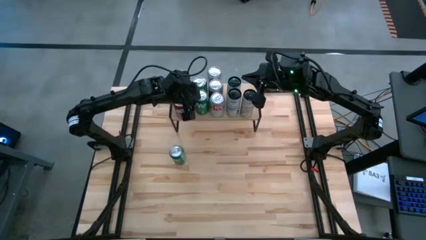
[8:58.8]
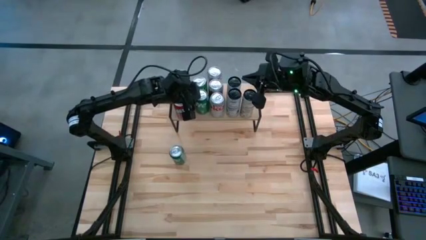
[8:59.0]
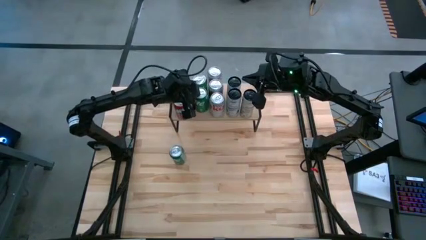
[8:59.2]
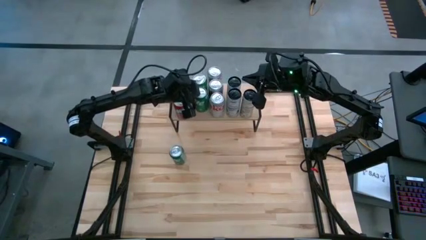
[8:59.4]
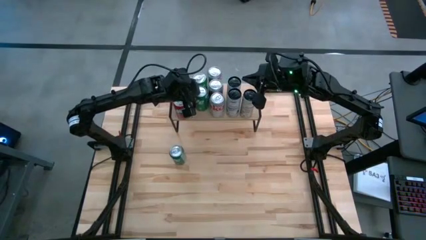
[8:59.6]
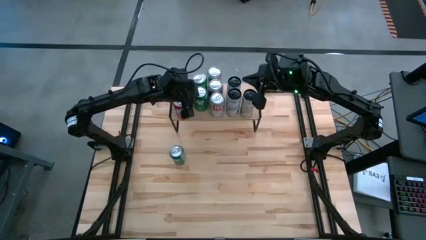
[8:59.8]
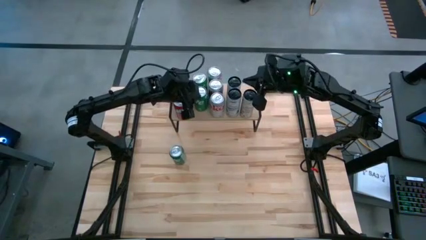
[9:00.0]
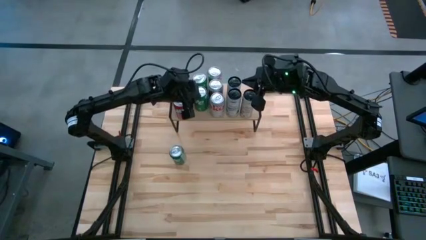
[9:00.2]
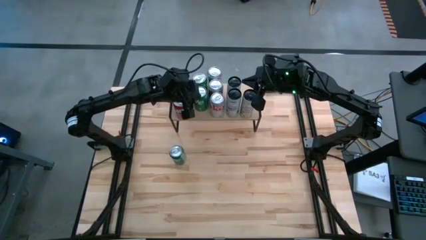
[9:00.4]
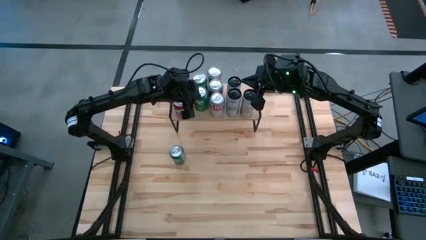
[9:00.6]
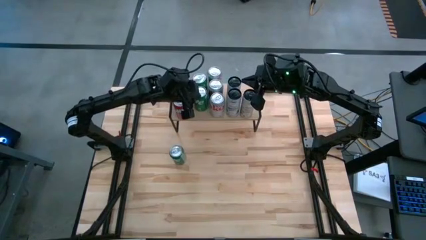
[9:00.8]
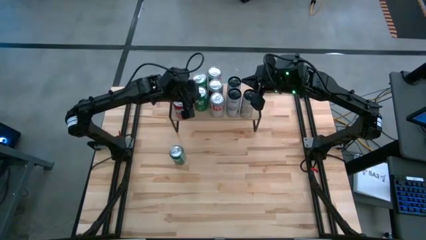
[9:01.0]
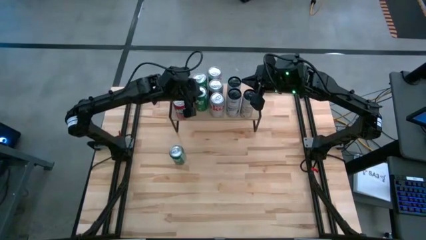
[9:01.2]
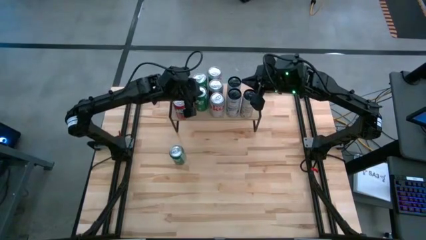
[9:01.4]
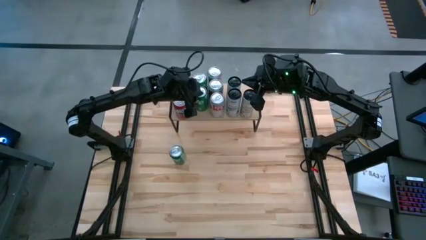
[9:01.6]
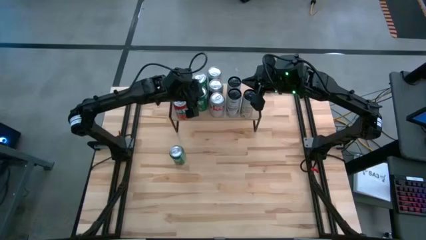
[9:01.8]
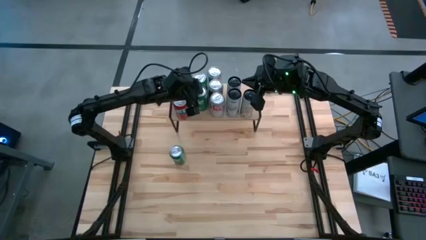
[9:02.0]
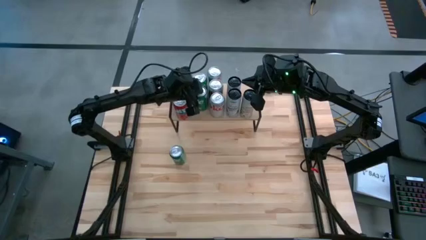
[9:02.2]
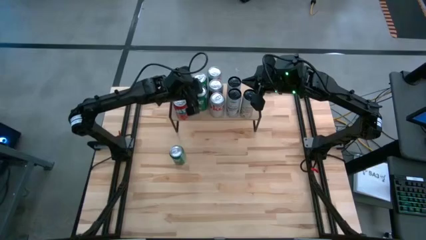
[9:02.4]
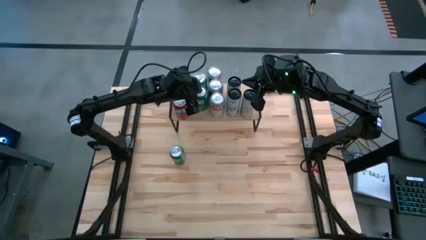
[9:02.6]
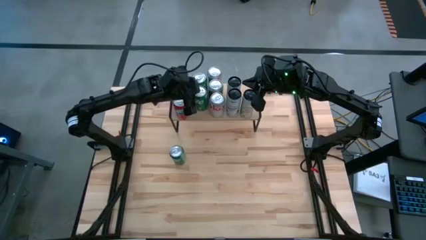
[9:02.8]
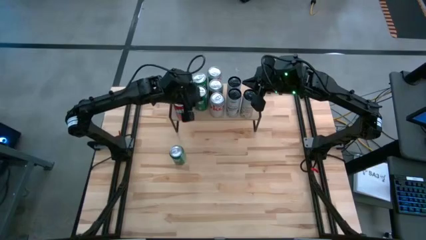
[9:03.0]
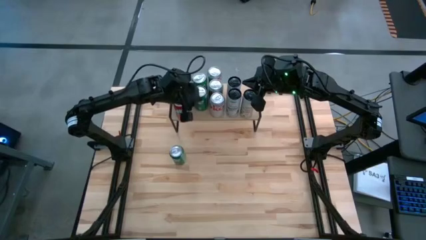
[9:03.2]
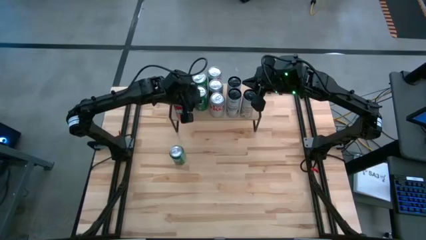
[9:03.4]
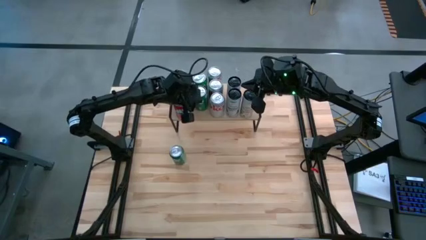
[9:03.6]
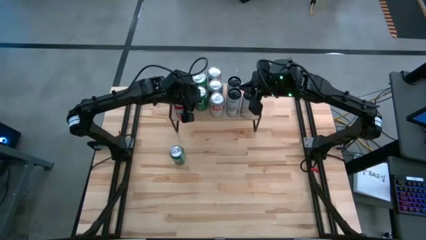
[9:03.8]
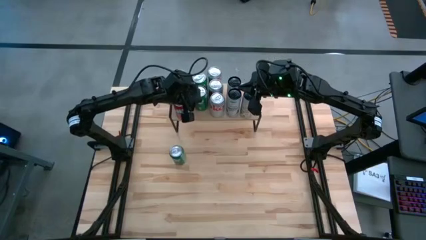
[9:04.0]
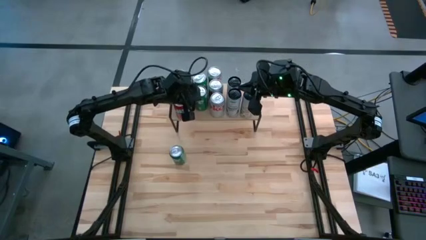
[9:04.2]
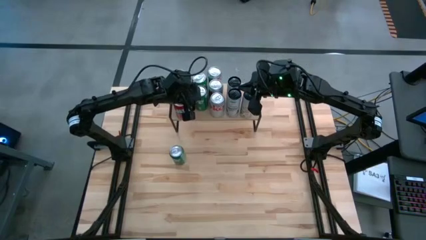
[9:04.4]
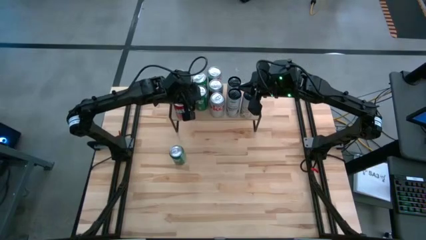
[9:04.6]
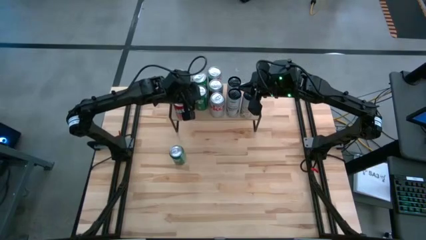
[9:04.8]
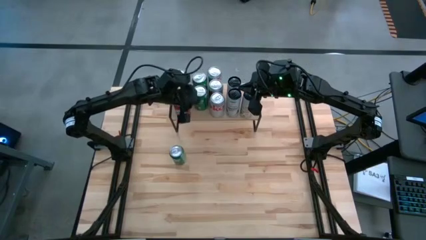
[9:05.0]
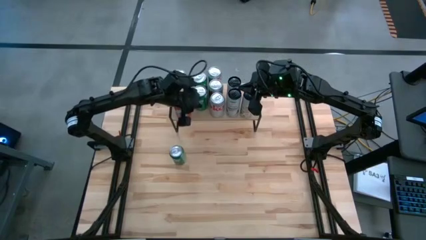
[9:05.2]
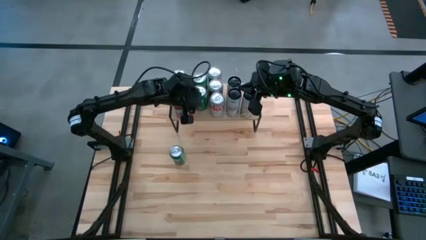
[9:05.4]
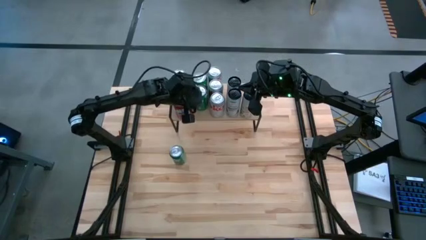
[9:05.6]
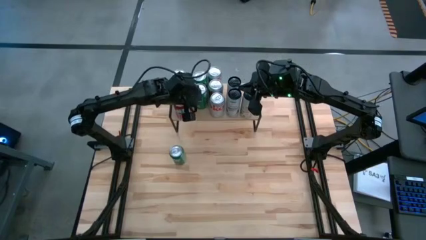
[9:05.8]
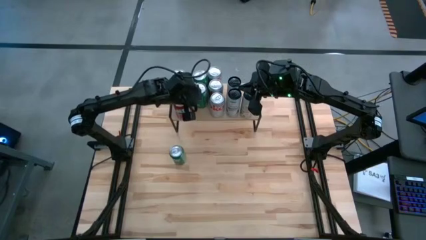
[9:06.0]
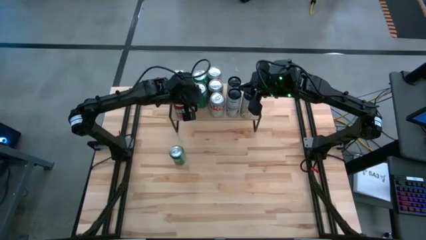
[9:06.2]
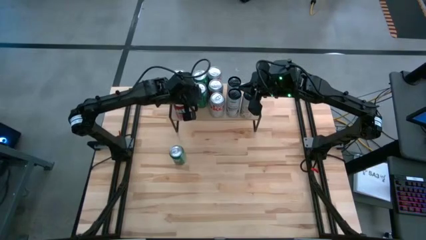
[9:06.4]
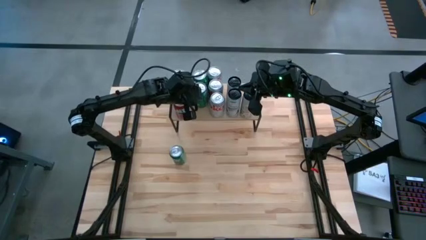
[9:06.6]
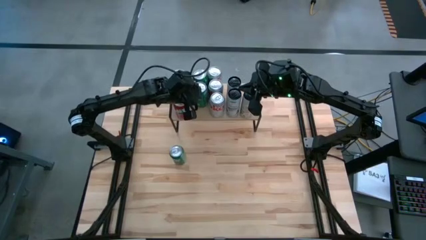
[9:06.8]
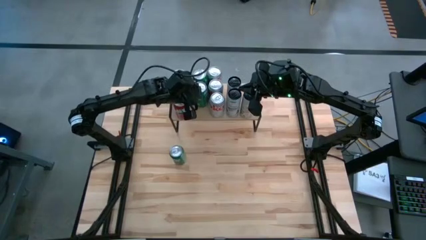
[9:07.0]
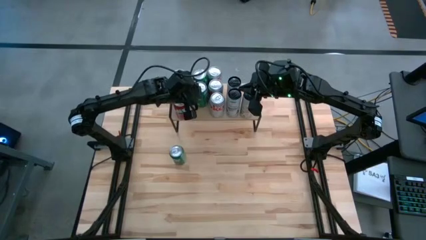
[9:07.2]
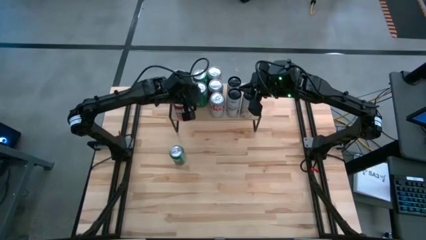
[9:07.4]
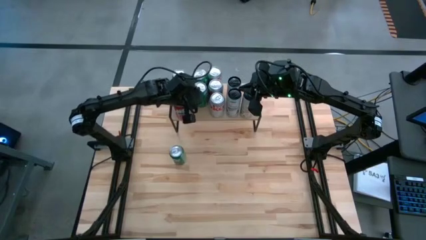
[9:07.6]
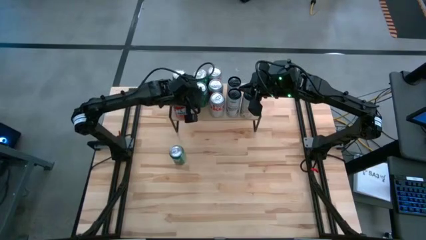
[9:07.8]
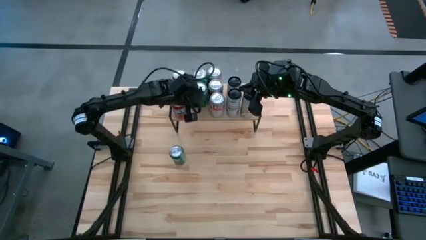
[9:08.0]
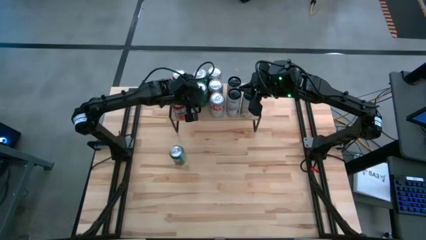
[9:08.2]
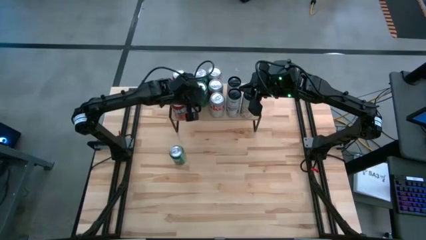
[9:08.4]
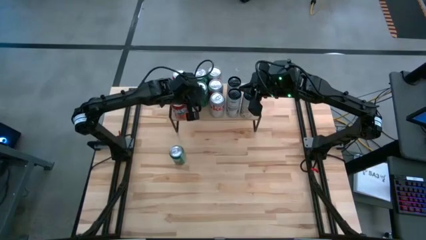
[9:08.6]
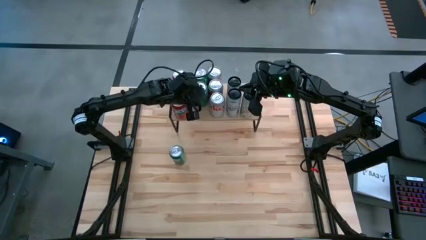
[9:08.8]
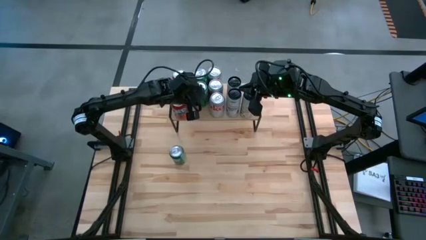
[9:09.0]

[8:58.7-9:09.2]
Task: Place canned beverage on shelf
Adjust the green soda cans on the shelf

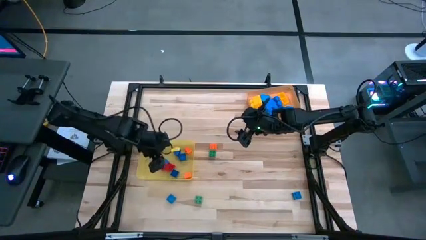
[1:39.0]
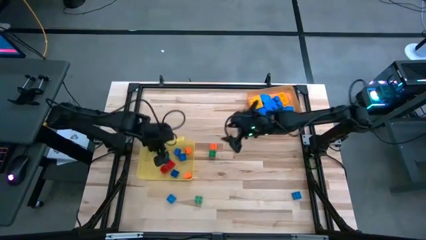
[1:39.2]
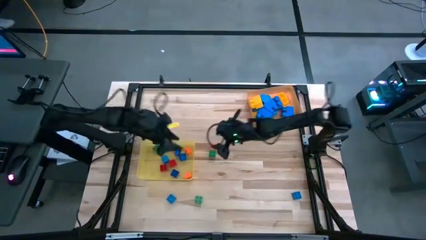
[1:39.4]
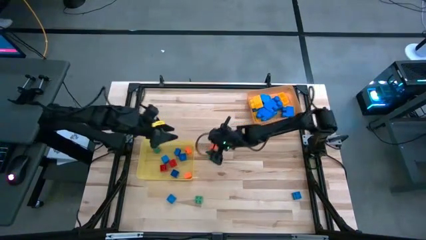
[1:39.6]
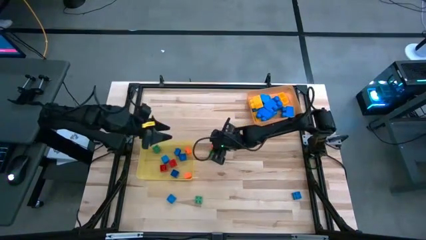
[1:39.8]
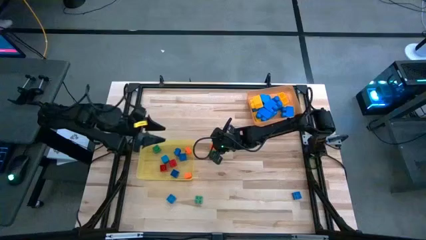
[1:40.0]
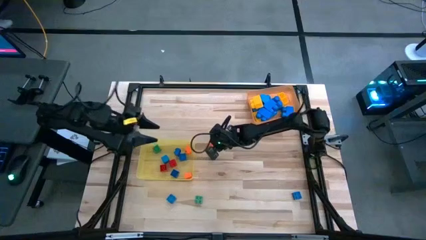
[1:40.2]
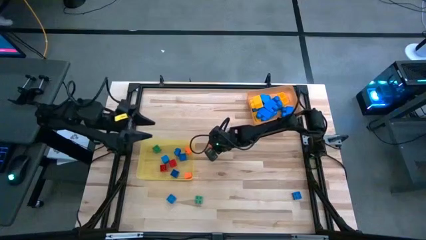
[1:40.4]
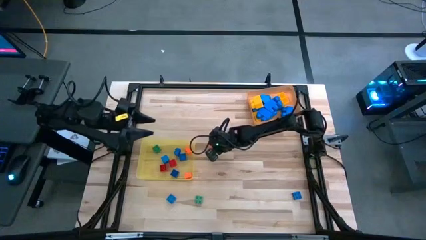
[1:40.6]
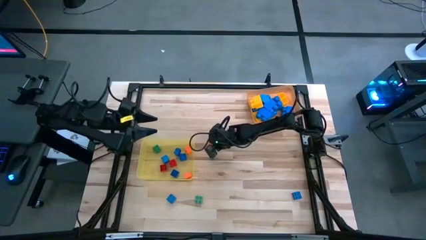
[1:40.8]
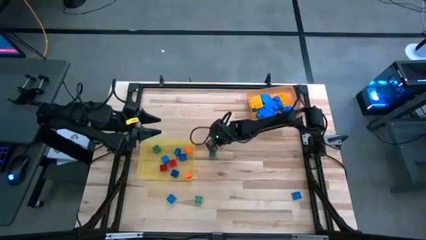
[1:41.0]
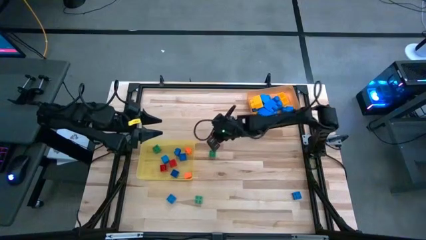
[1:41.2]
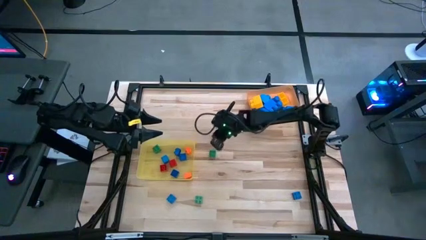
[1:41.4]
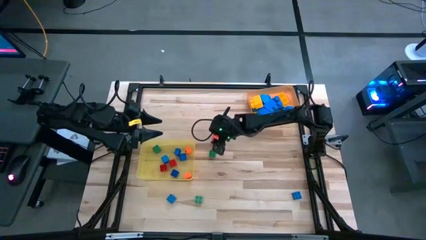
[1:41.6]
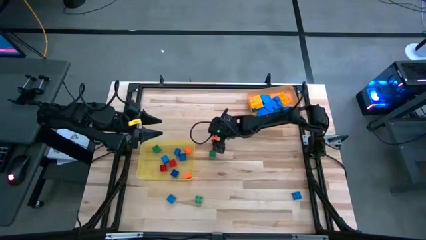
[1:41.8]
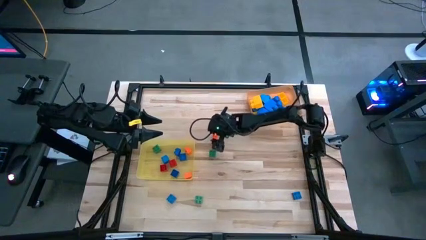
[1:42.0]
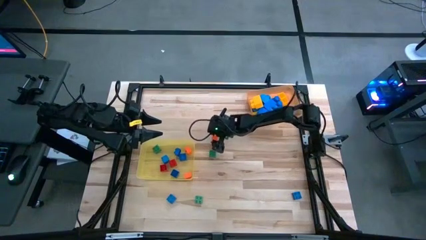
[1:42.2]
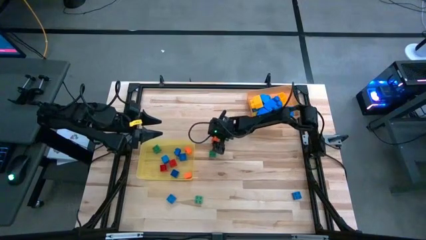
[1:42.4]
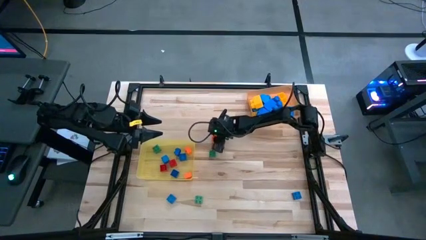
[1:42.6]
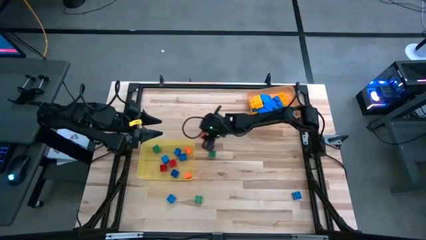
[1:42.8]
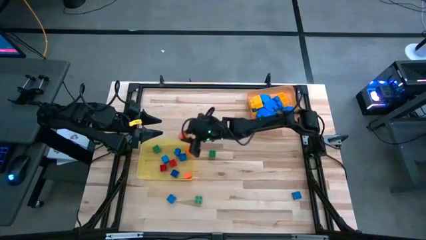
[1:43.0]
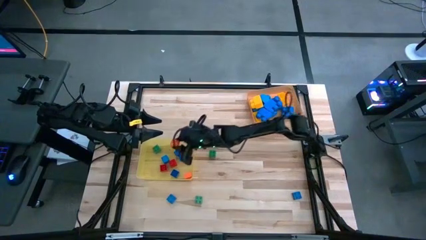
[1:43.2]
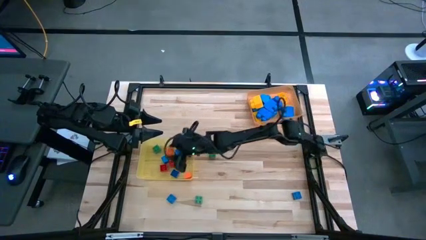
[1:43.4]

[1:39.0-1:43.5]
Task: Sort blocks by size
Put the small 4 stud orange game piece into the yellow bin

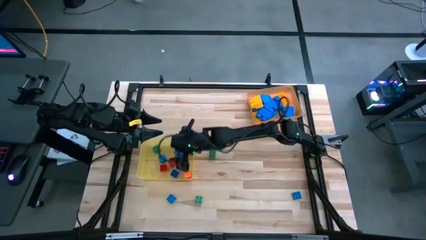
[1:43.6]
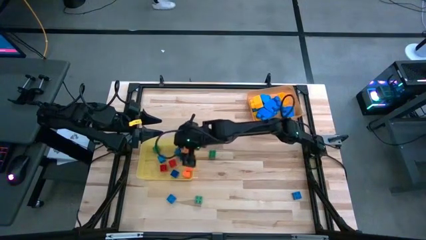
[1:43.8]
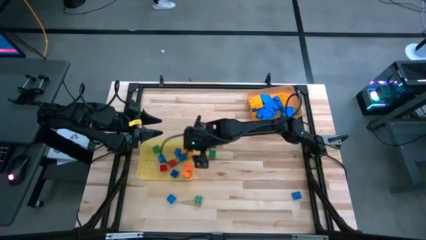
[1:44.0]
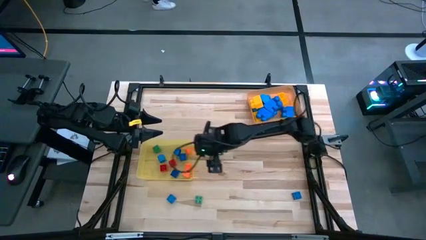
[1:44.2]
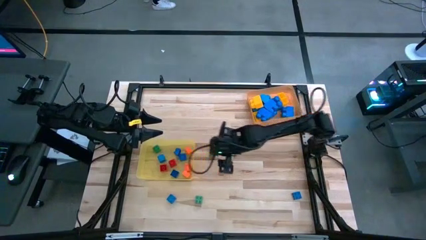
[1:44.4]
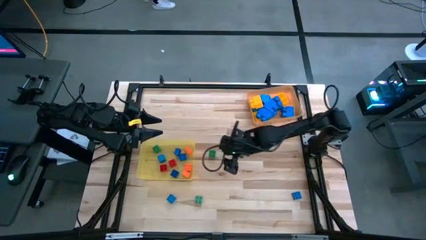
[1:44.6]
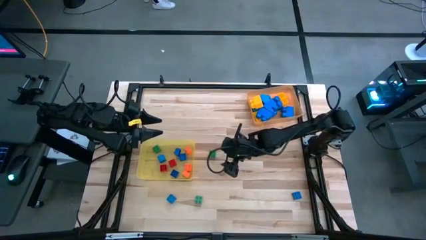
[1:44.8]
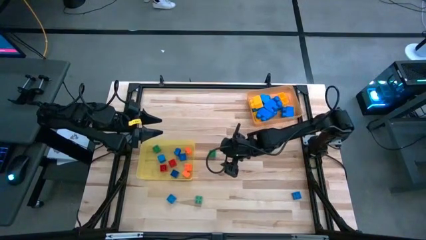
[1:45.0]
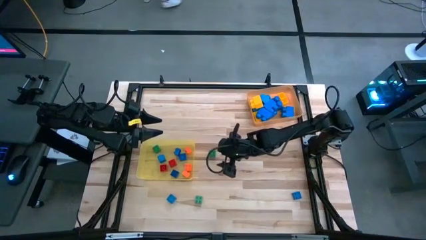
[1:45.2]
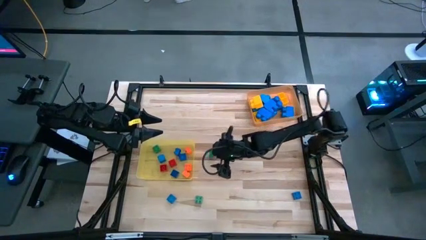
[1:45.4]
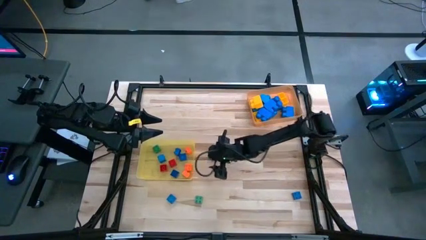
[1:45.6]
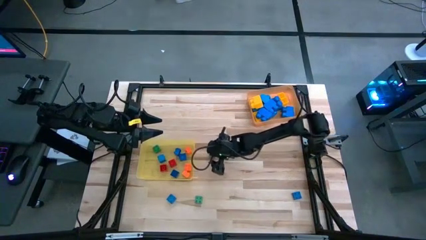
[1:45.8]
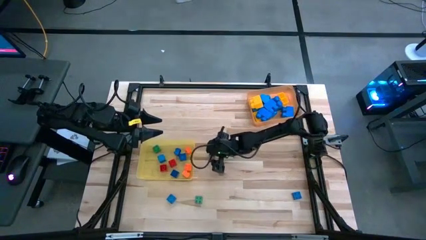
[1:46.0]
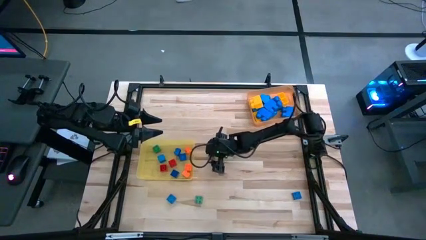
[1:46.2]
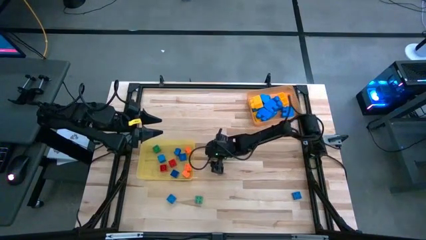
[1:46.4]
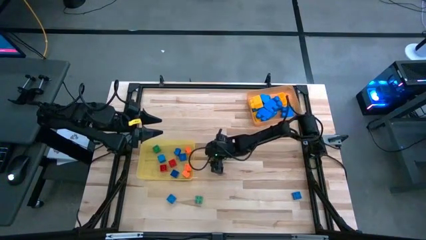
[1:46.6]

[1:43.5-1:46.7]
Put the small 4 stud green game piece into the yellow bin
